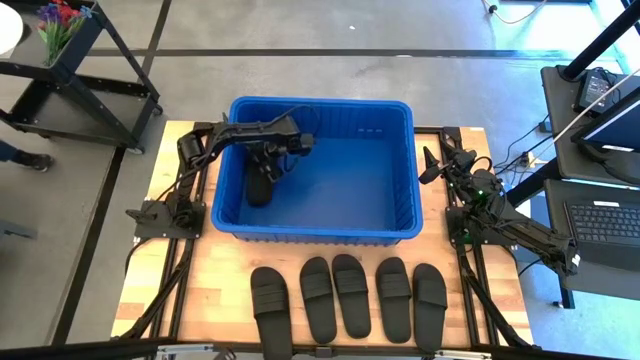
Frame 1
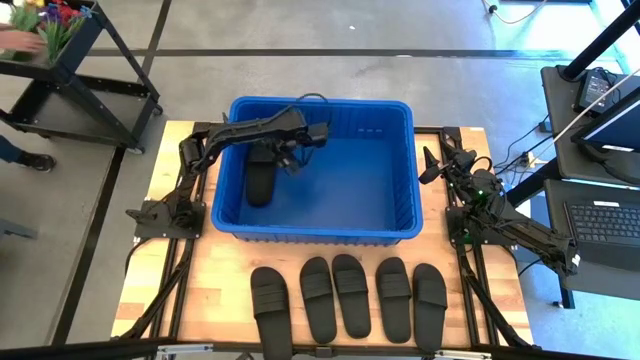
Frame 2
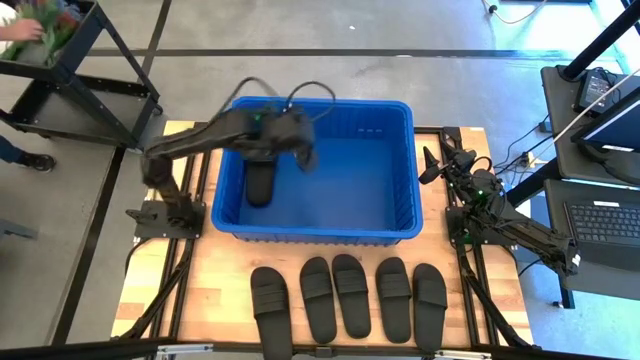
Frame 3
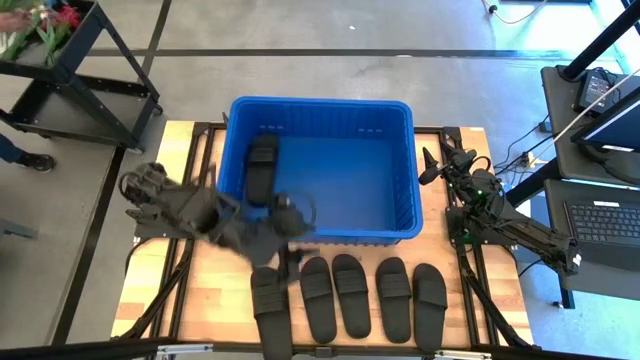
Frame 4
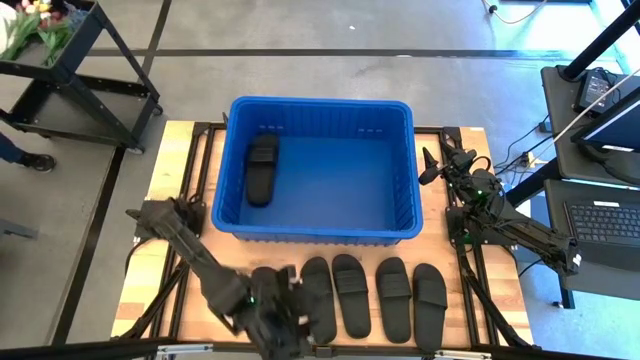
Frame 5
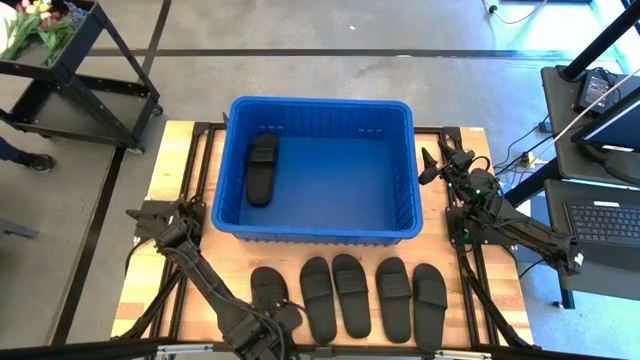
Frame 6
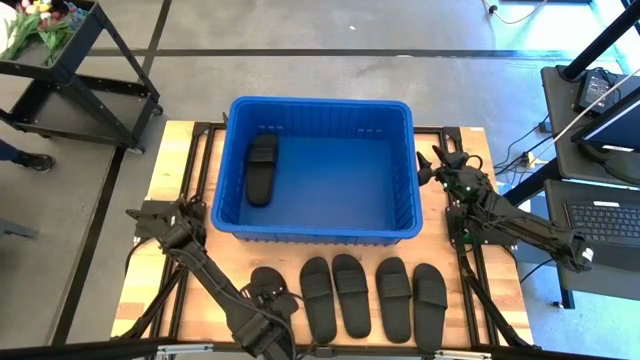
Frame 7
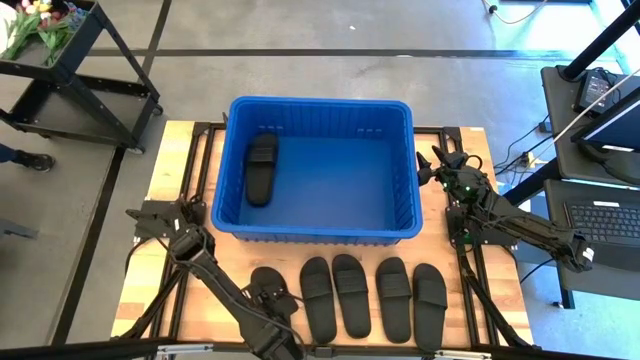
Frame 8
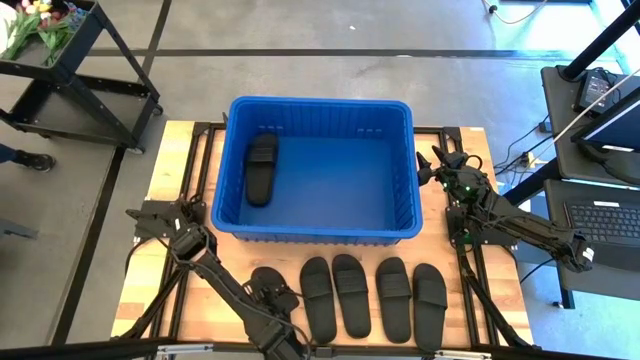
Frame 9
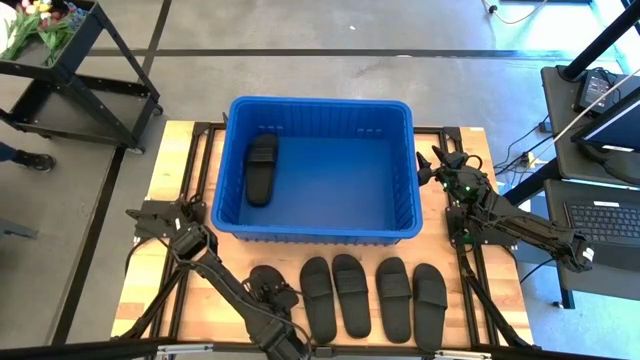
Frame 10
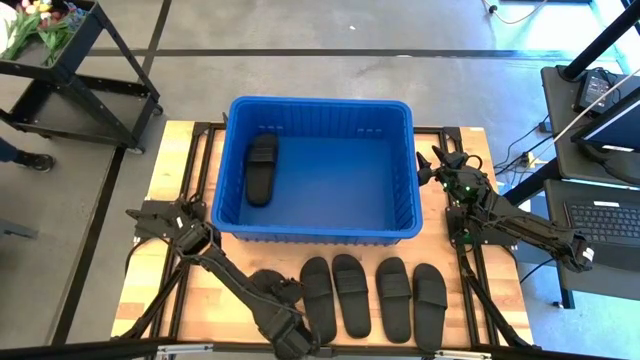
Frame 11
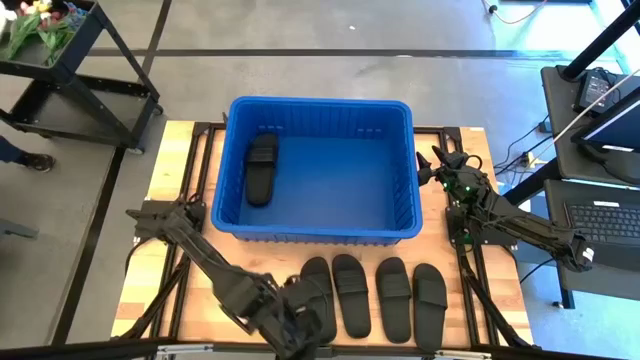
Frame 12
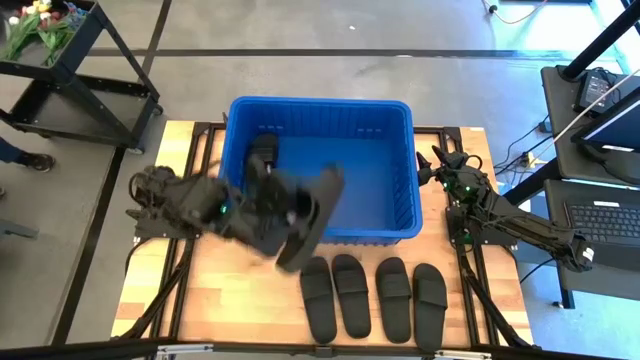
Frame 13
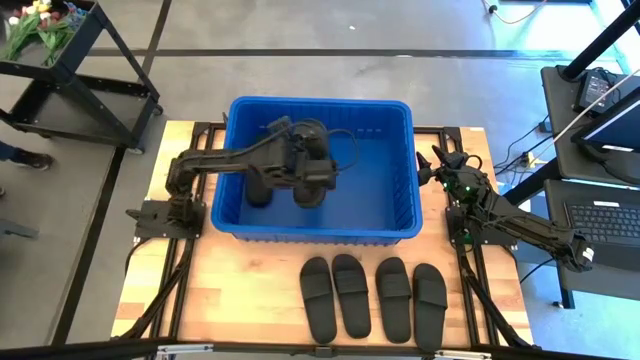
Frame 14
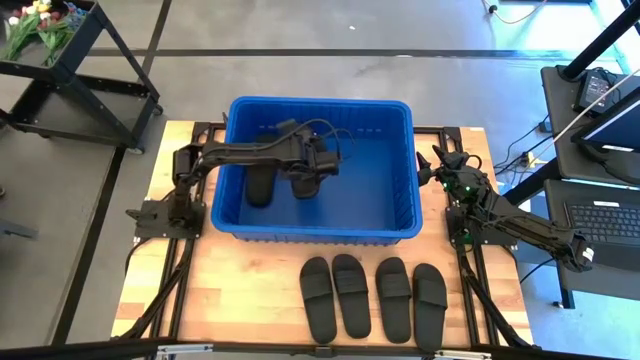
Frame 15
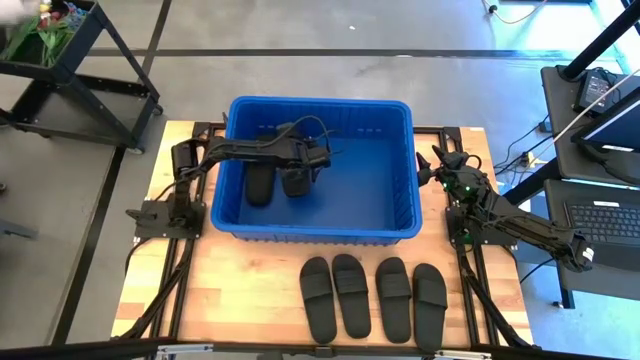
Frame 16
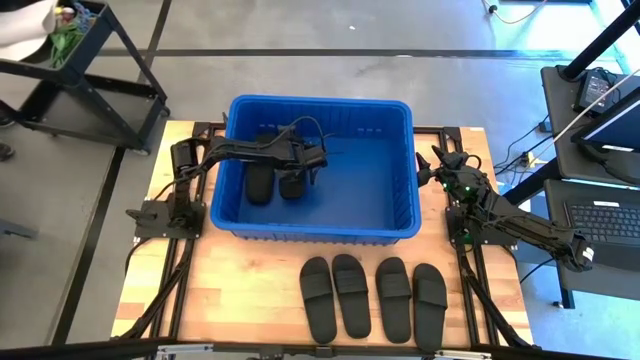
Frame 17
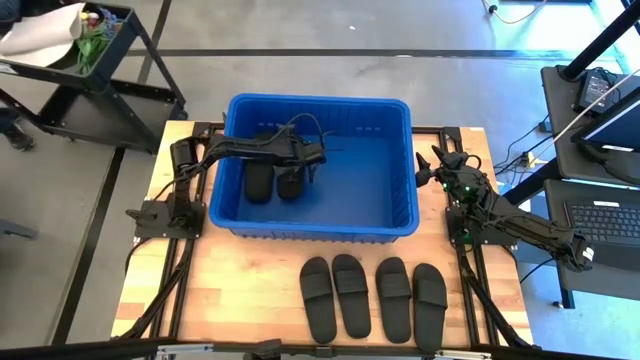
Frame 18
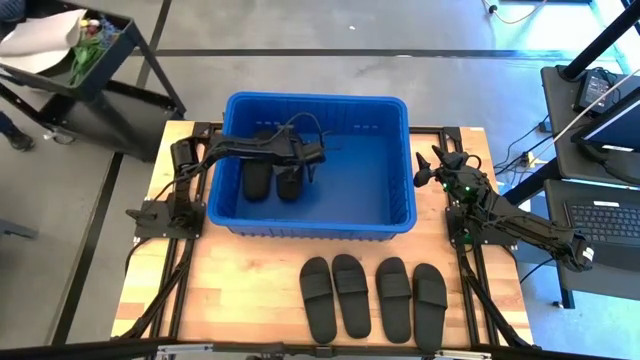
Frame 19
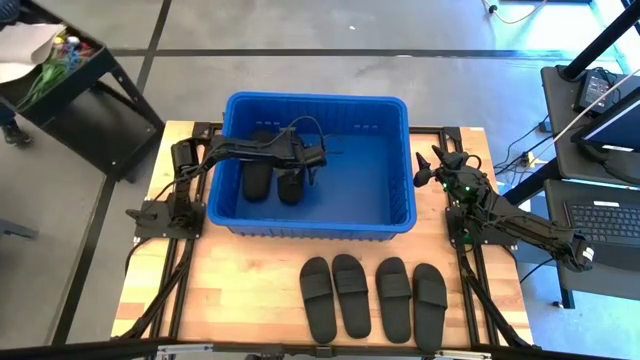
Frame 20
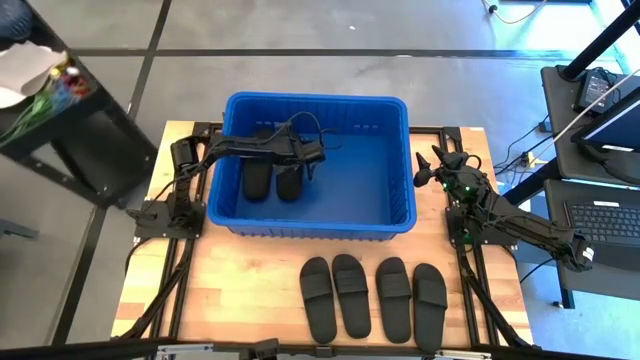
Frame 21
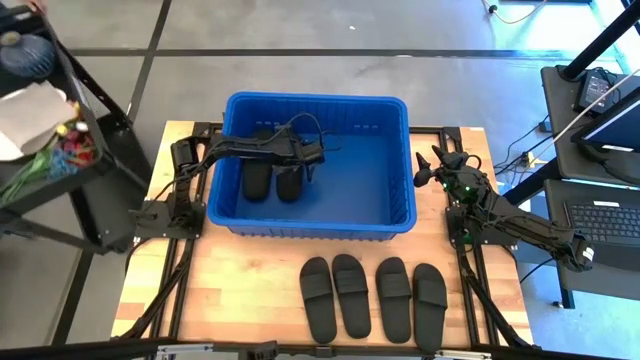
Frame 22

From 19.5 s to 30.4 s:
Task: Pick and place slides into bin
Put the black slide into the blue bin

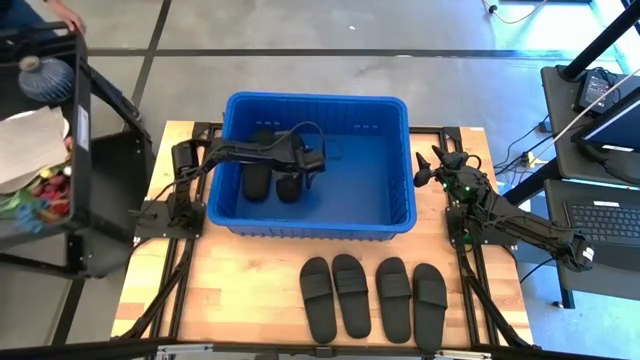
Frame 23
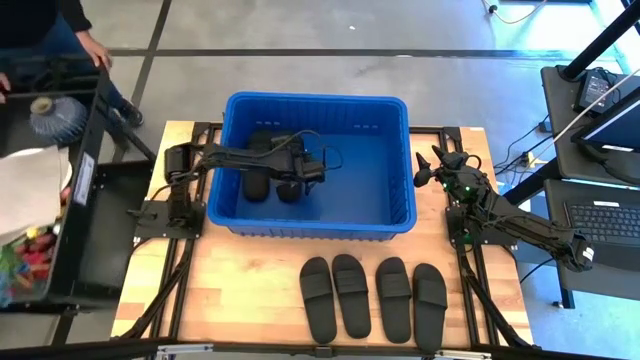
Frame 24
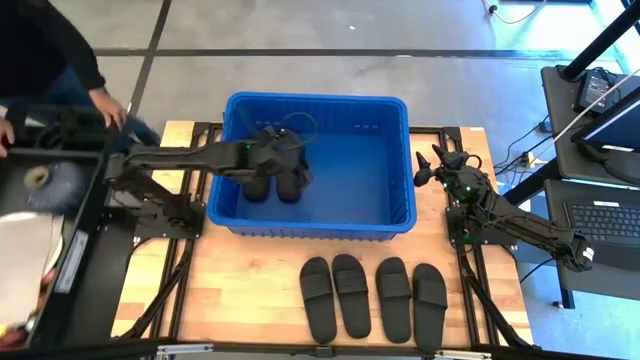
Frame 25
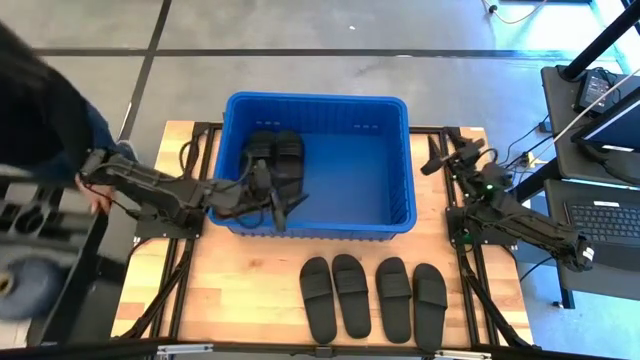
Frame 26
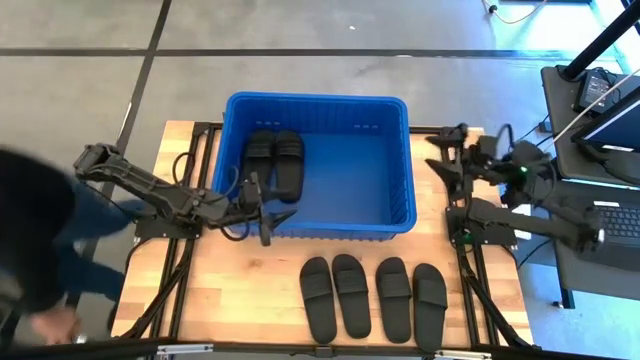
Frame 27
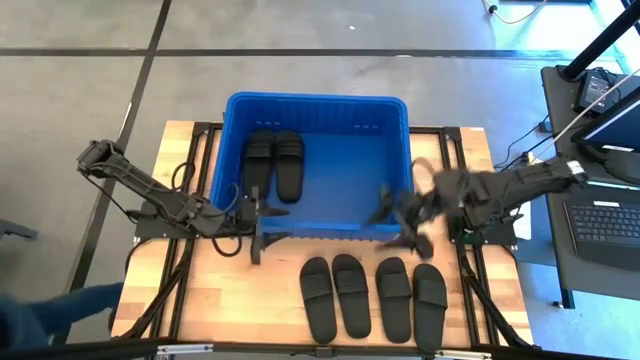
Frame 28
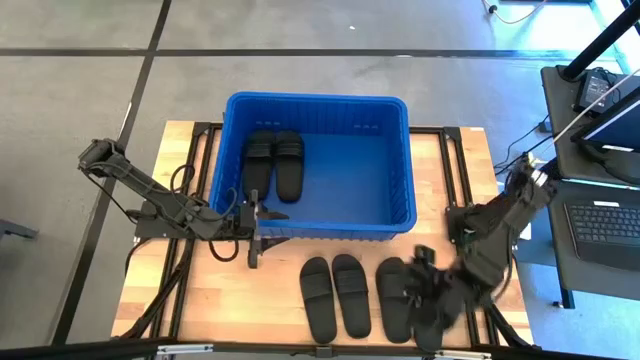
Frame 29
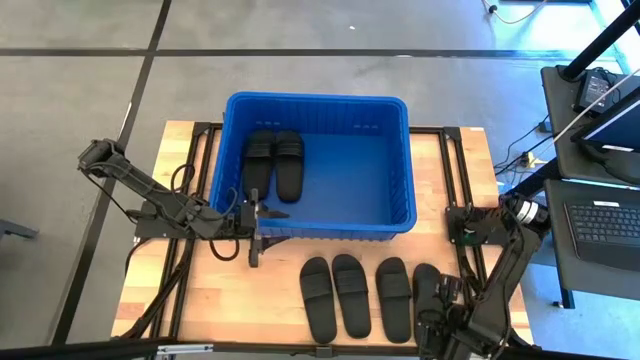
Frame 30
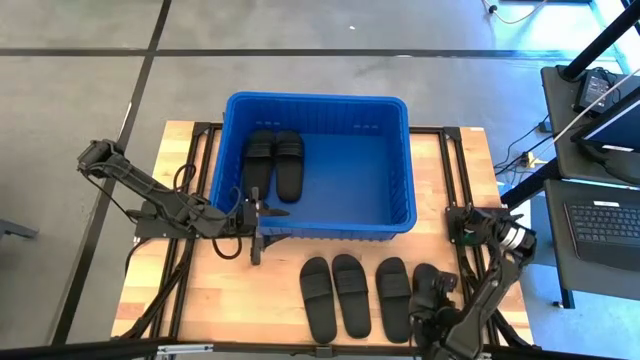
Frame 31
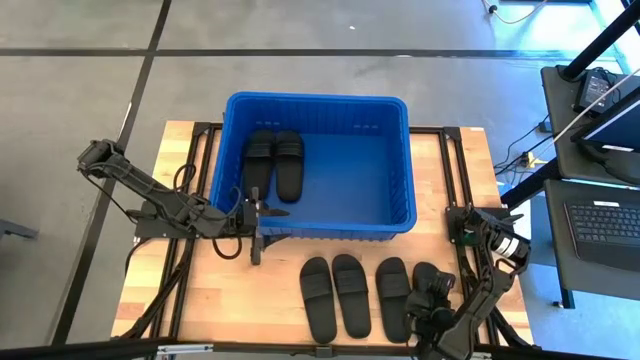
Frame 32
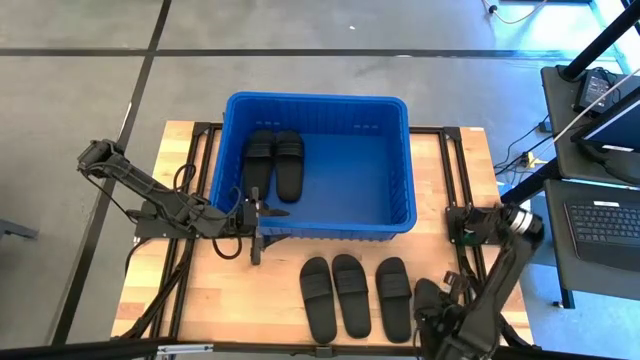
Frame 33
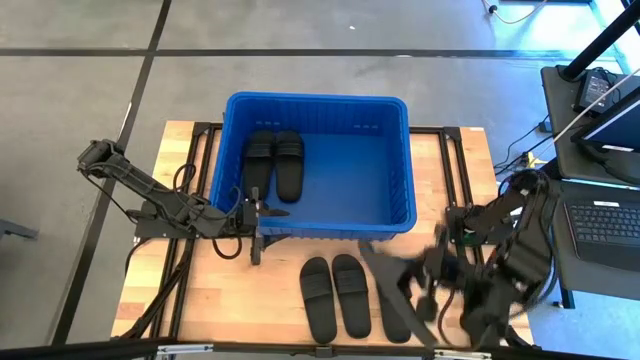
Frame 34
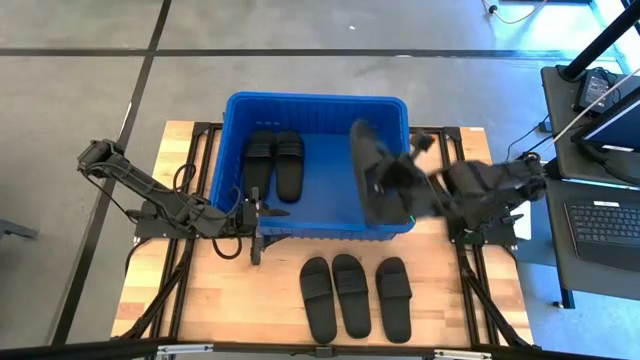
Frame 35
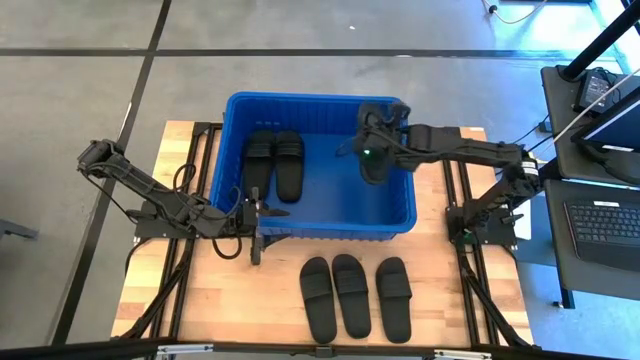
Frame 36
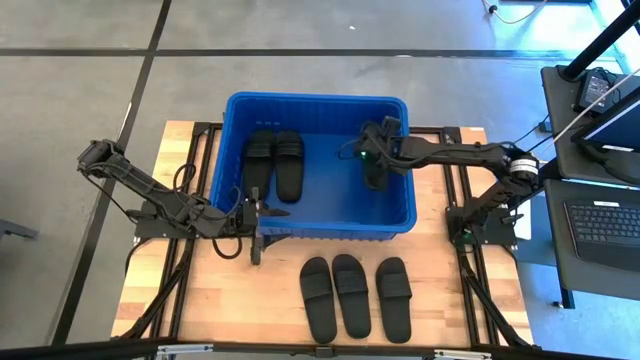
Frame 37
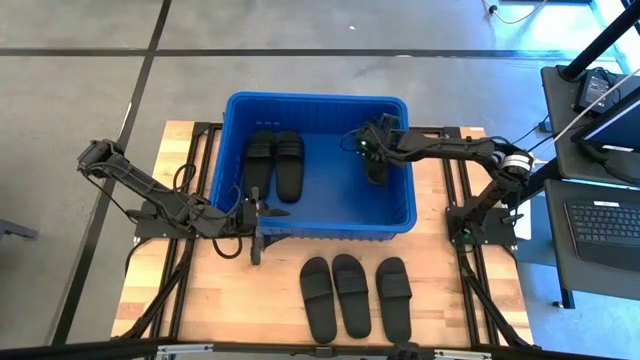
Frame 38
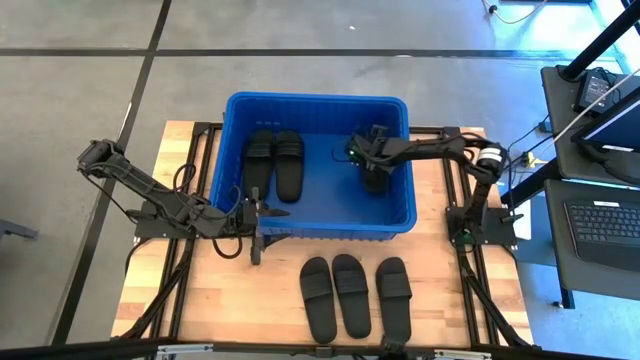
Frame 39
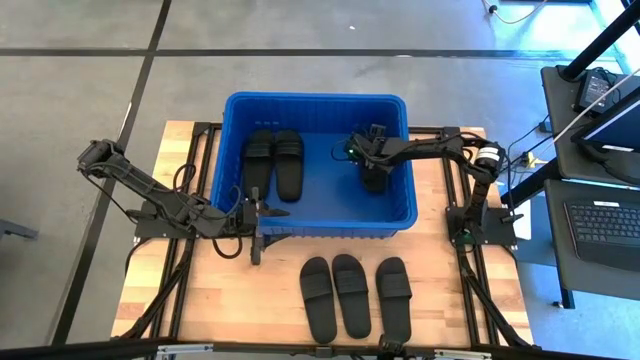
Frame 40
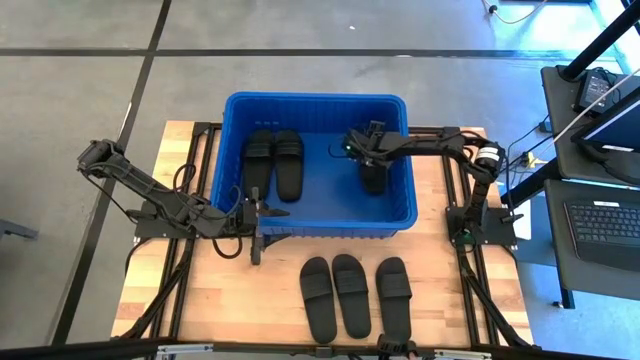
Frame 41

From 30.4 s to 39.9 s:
Put the black slide into the blue bin
